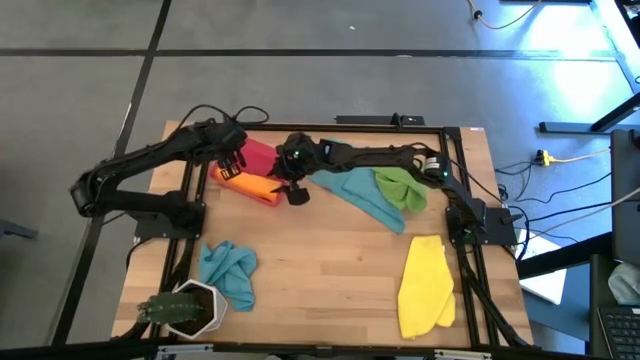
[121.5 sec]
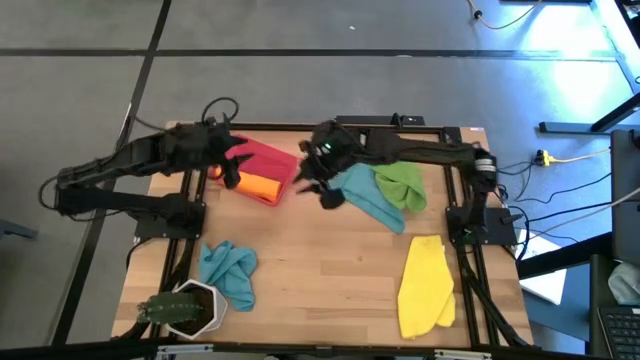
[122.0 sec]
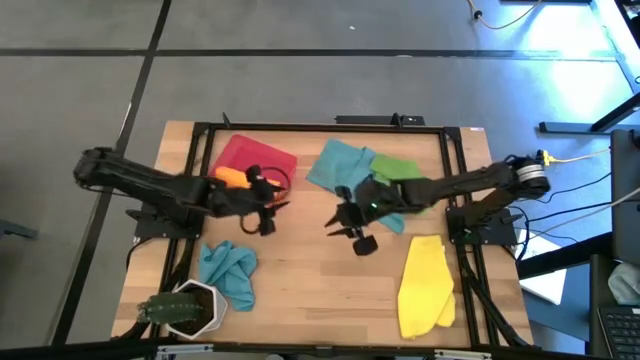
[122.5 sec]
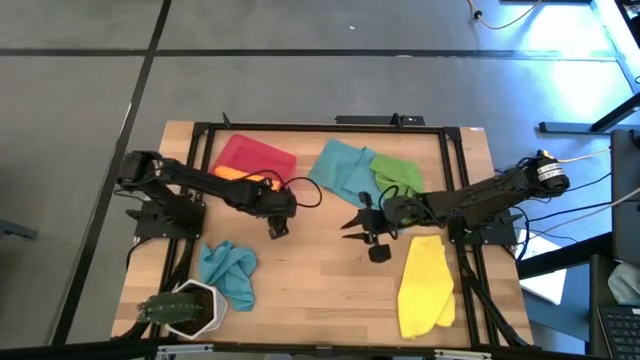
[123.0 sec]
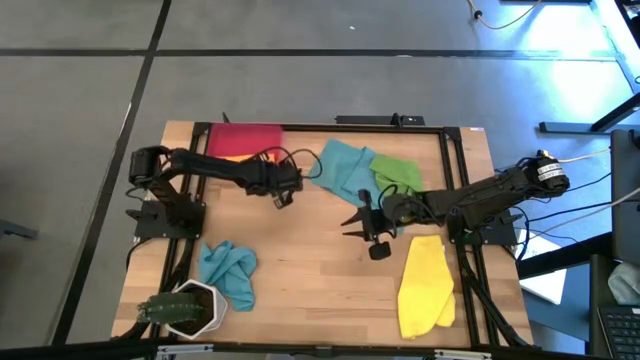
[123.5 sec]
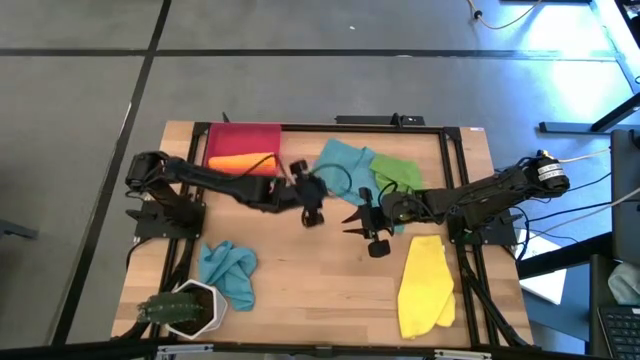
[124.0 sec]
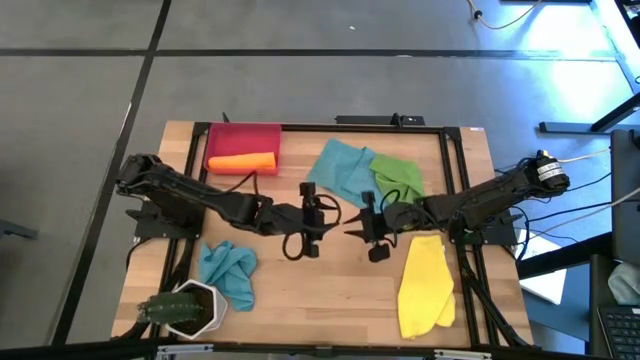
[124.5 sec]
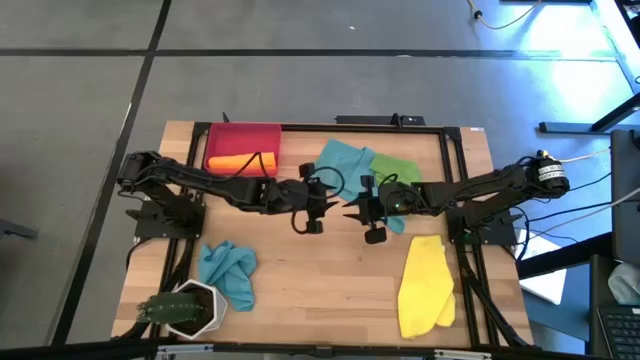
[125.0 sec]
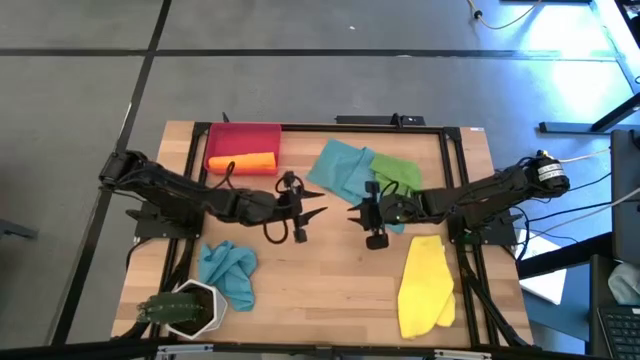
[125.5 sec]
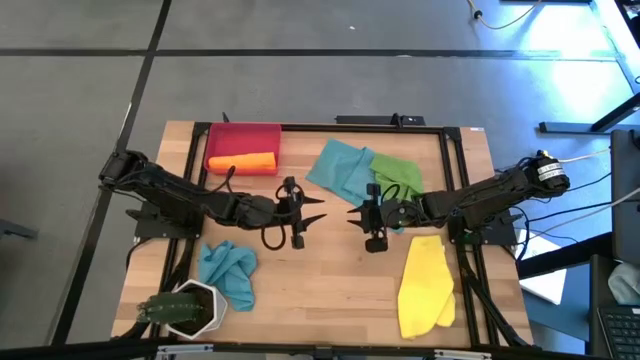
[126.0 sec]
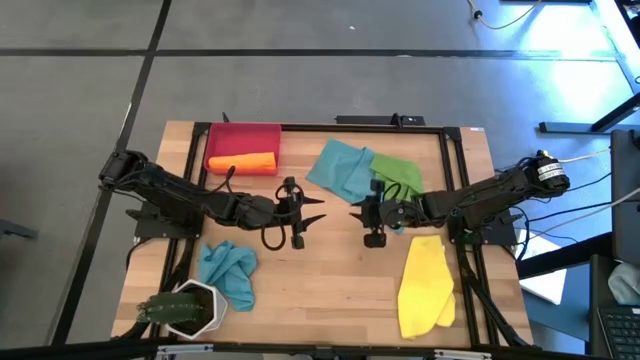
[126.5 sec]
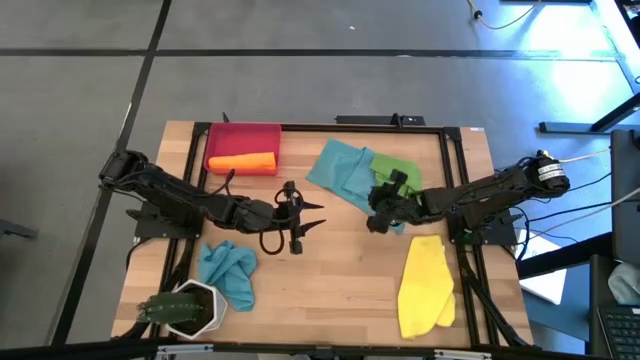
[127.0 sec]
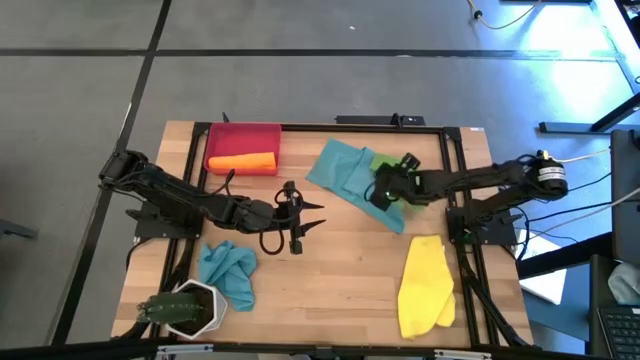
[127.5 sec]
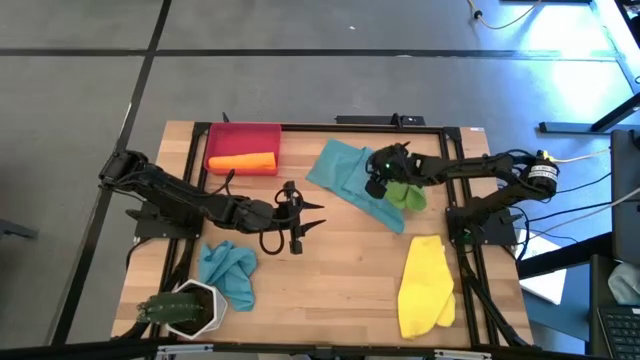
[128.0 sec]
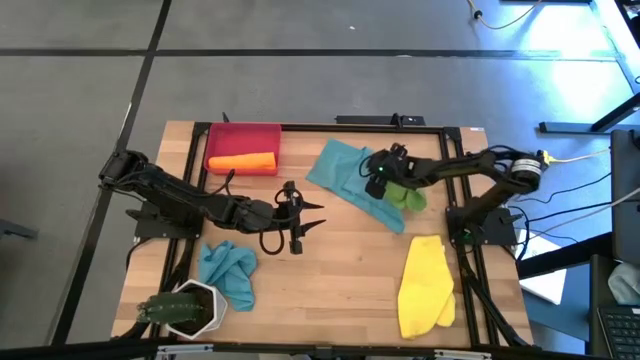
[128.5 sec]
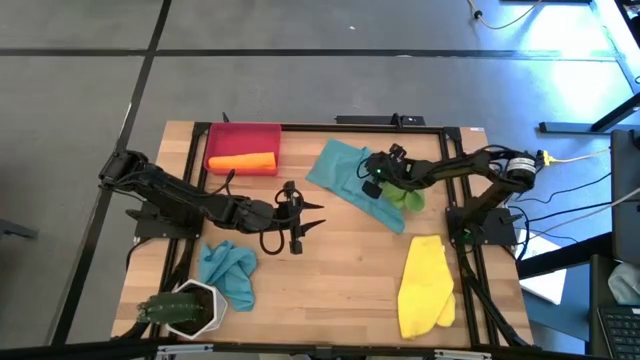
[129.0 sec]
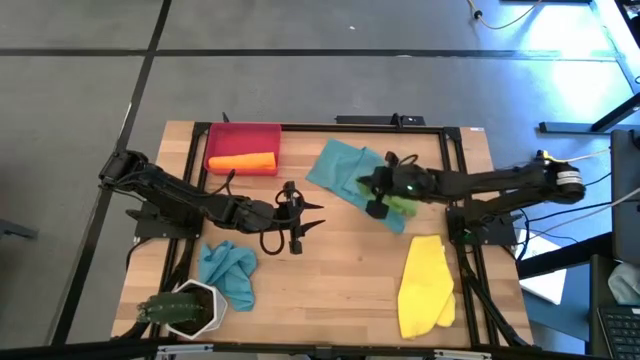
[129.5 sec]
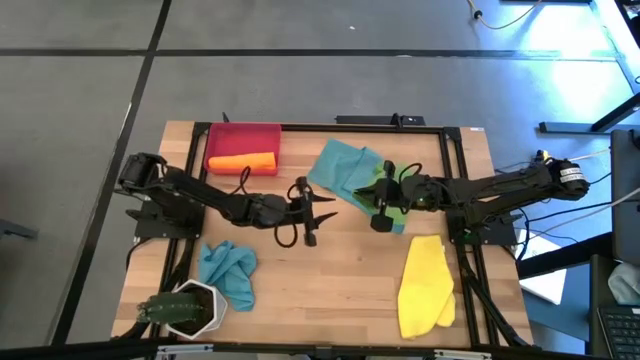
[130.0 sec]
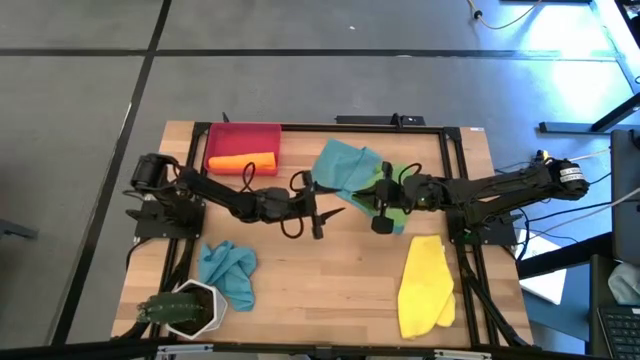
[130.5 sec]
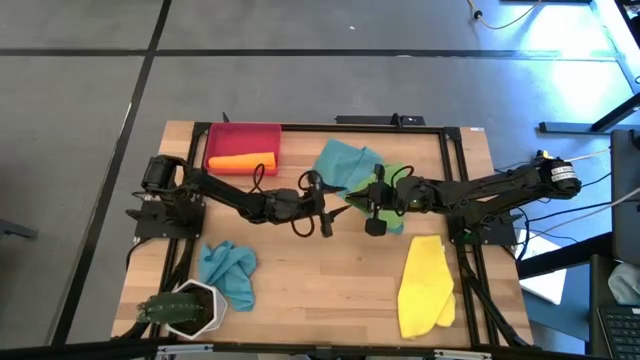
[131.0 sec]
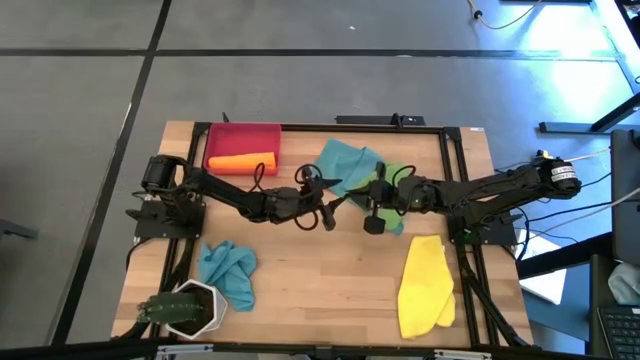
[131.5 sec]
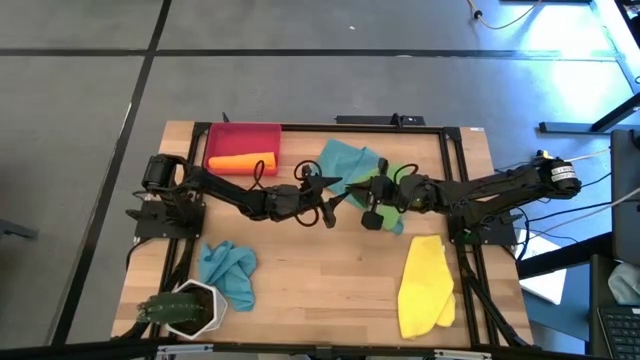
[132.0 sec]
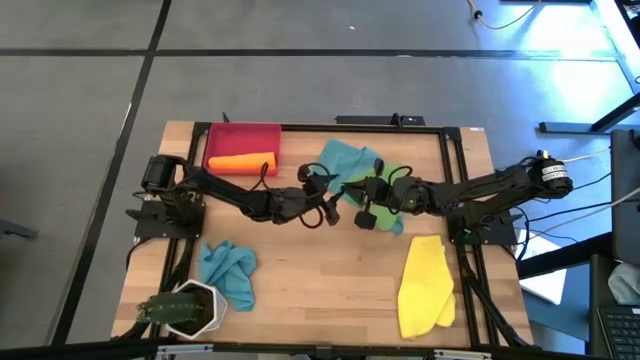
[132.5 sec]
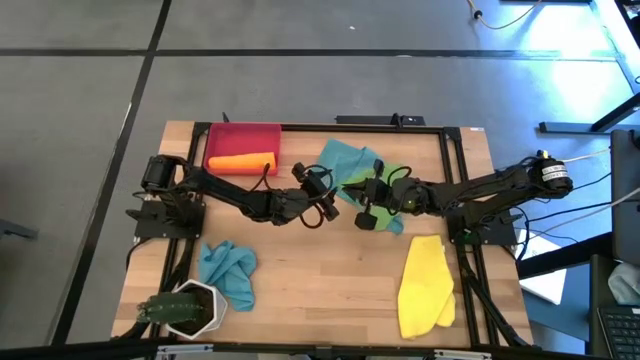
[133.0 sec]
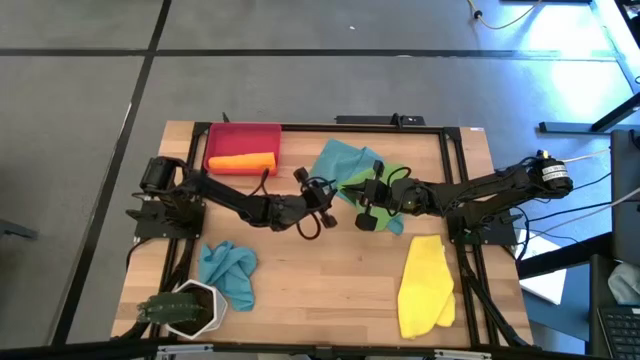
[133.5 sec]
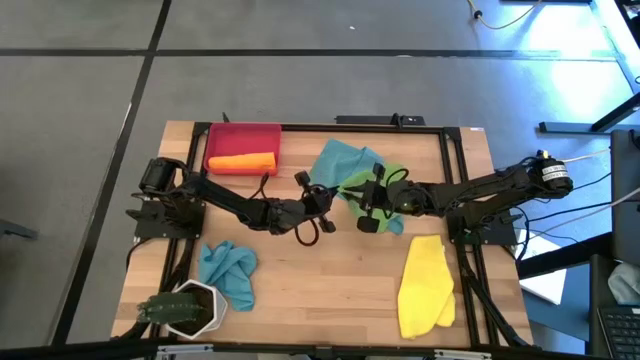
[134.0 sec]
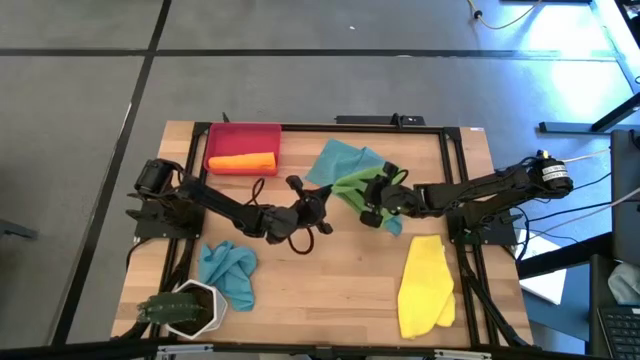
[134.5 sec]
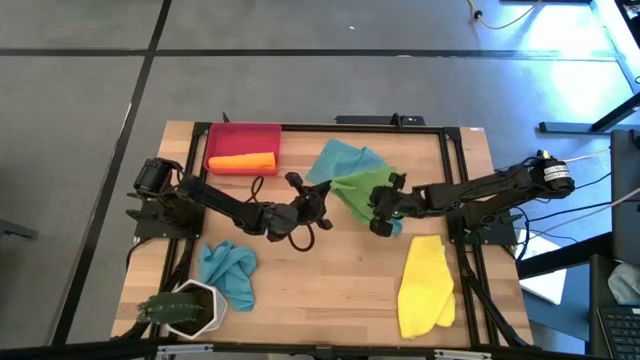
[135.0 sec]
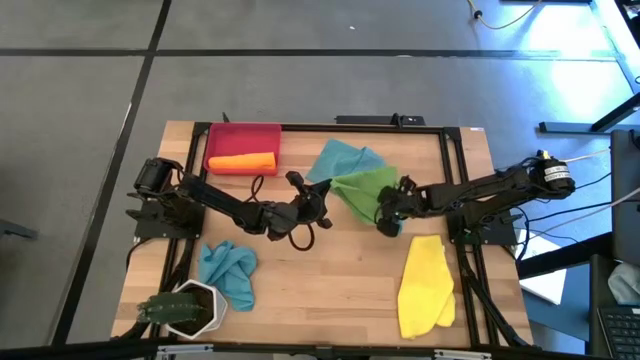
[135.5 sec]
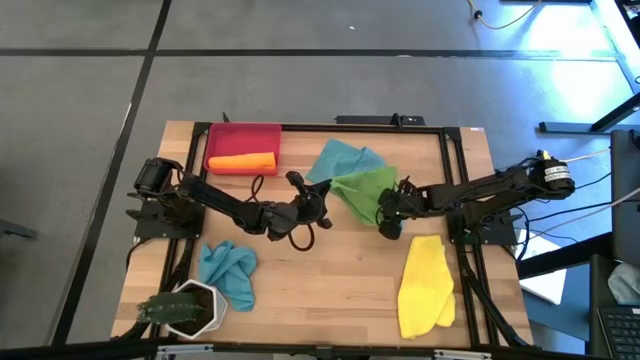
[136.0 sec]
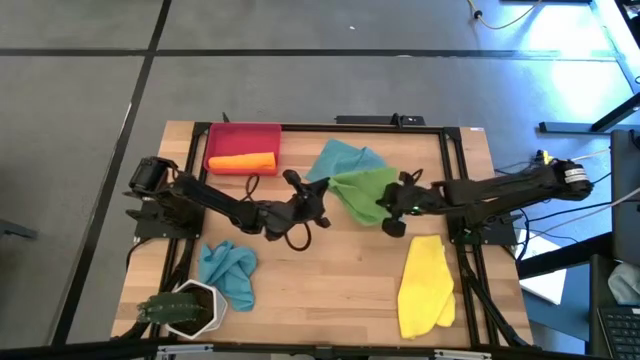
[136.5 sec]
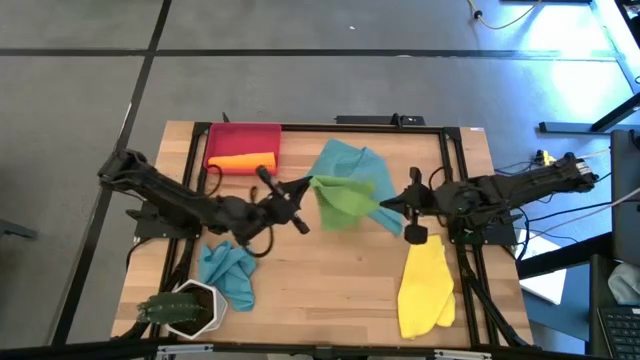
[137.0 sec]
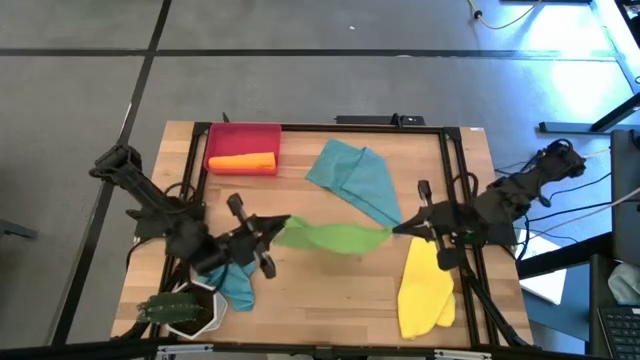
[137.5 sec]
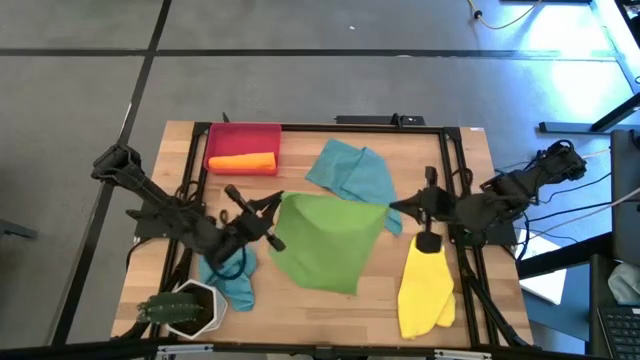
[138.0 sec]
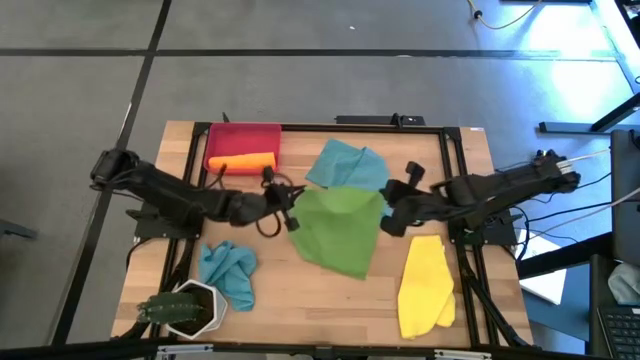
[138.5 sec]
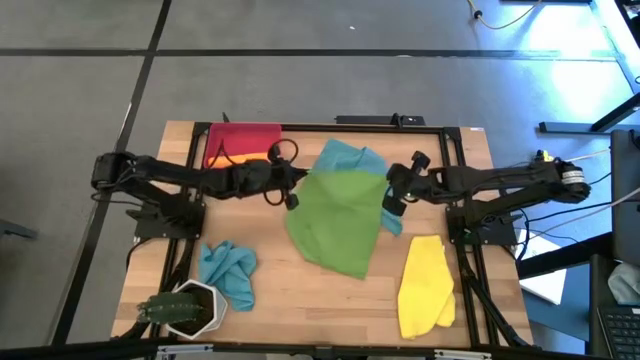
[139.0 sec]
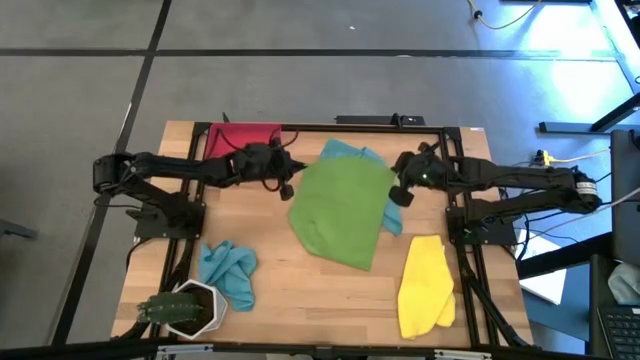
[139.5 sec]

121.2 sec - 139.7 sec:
Task: Roll microfiber towels into tight, uniform cylinder then place into a basket
Fold the green microfiber towel

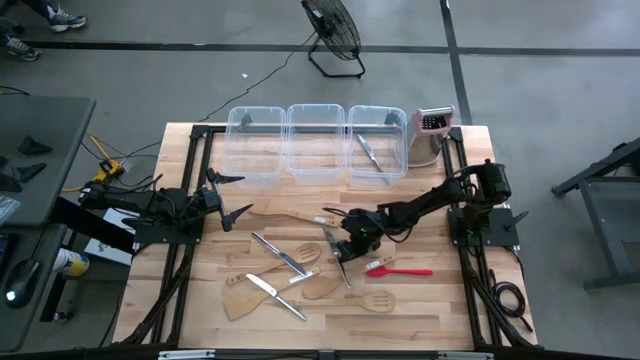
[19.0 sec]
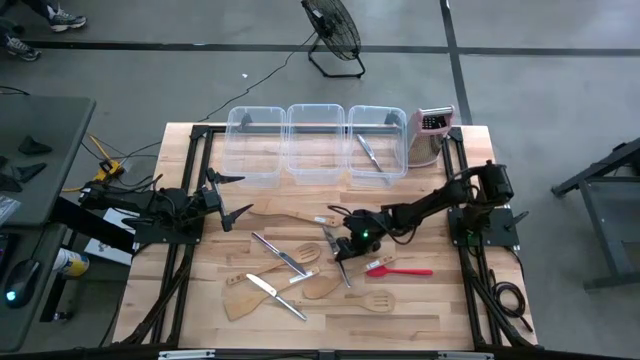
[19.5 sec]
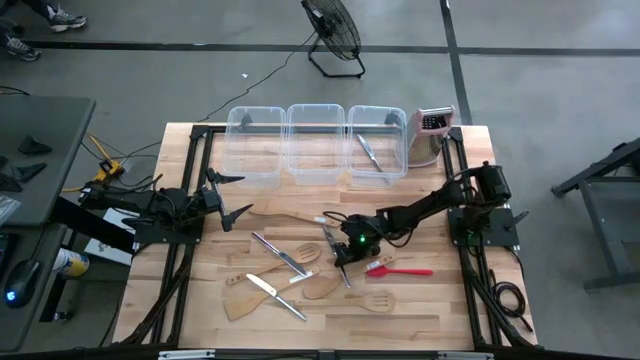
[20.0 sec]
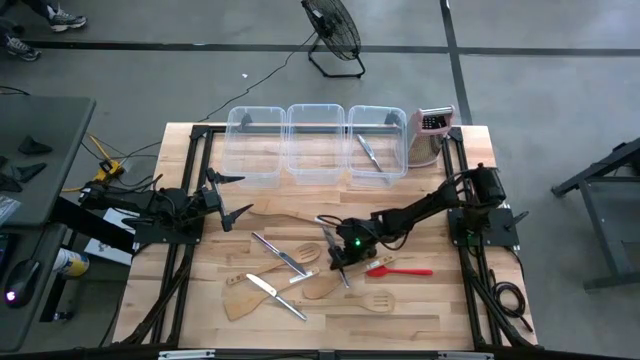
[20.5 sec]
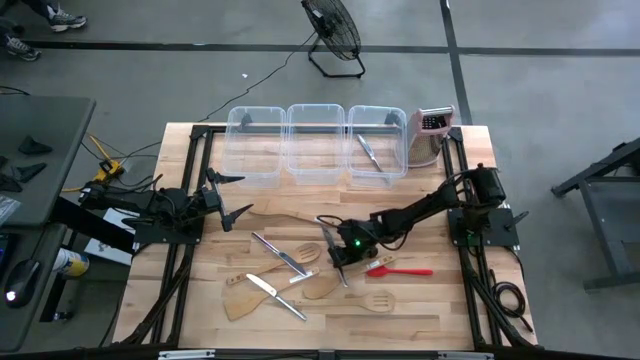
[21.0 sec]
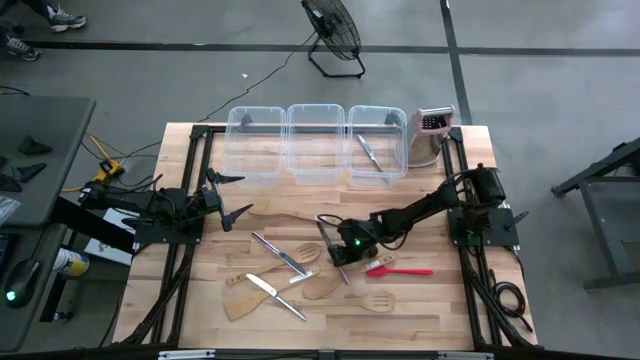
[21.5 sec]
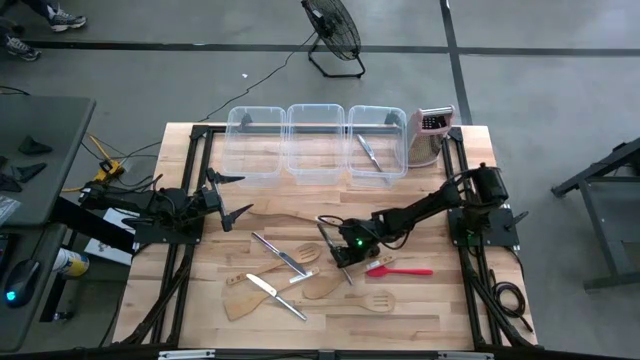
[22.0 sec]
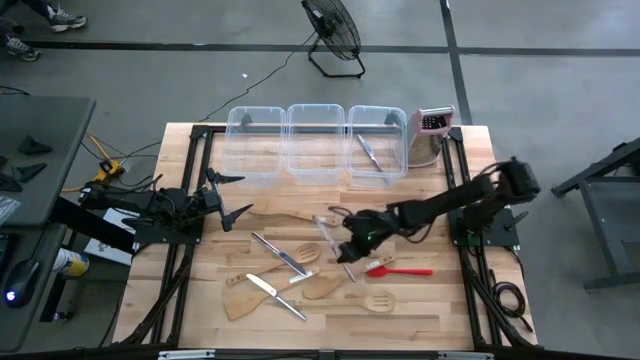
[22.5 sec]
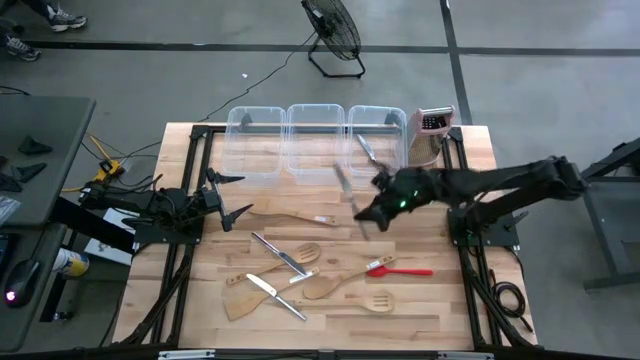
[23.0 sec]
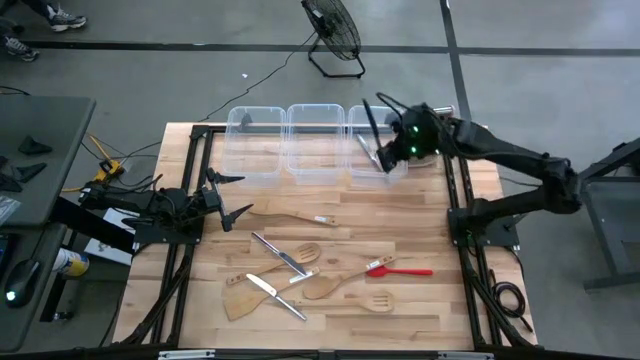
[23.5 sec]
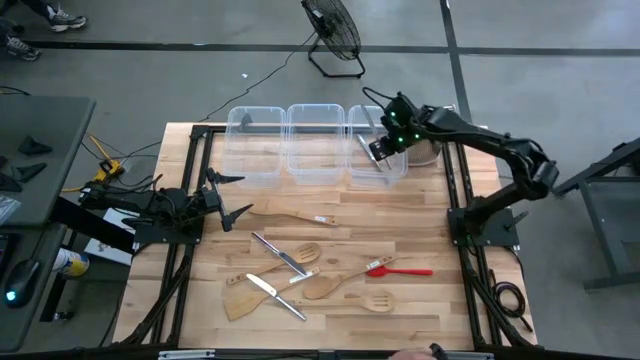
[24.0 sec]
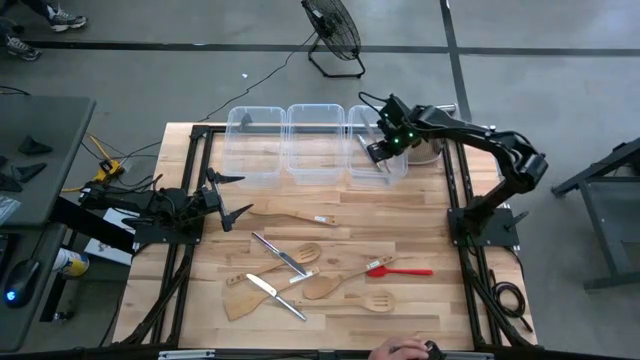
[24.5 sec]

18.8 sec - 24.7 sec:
Task: Pick & Place Kitchen Items
Put the table knife into the right transparent bin
